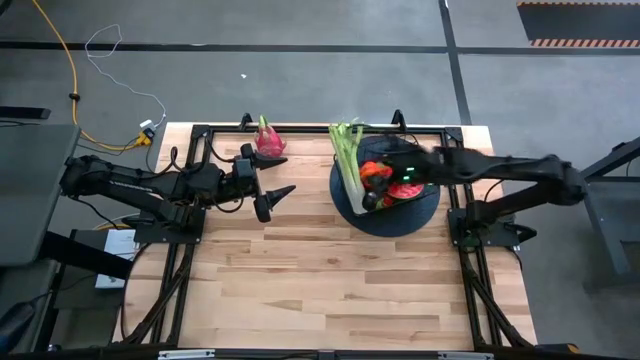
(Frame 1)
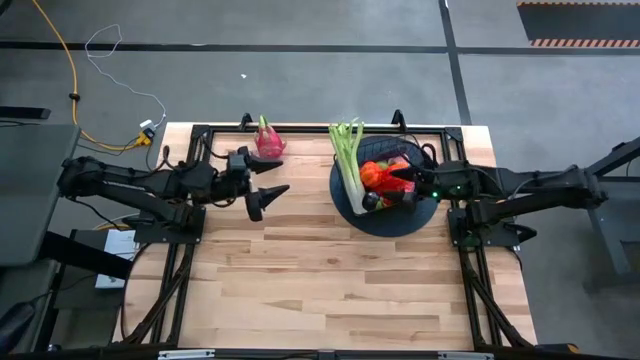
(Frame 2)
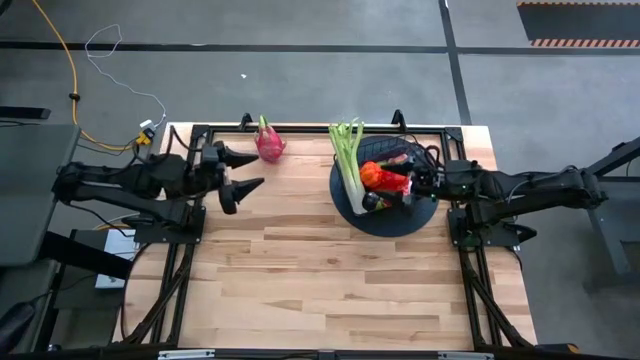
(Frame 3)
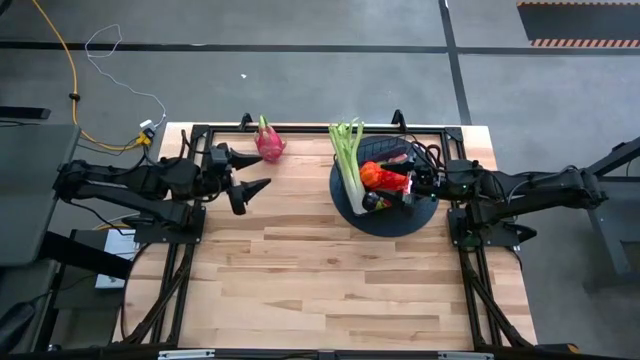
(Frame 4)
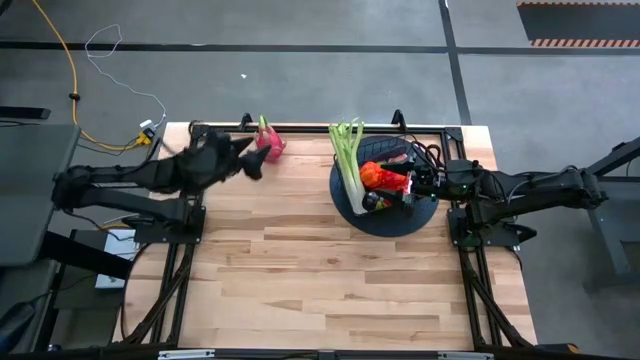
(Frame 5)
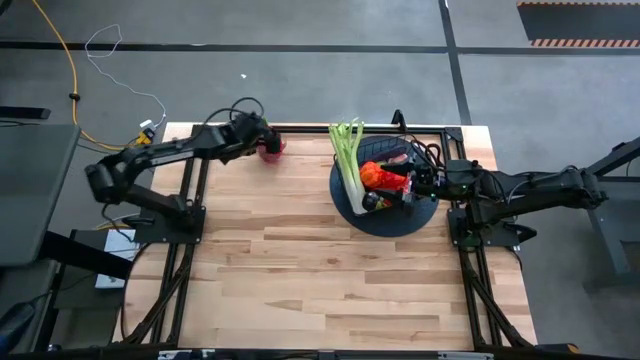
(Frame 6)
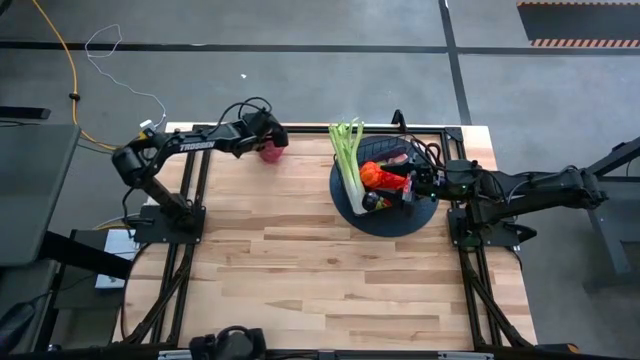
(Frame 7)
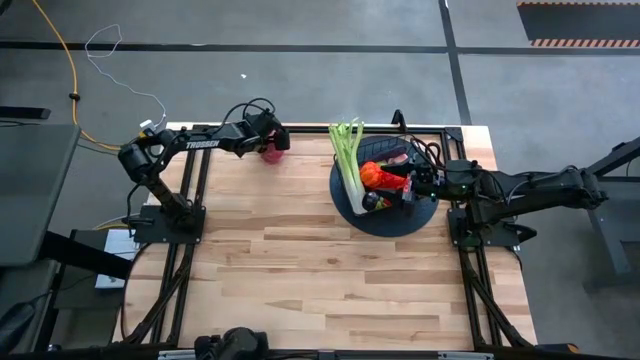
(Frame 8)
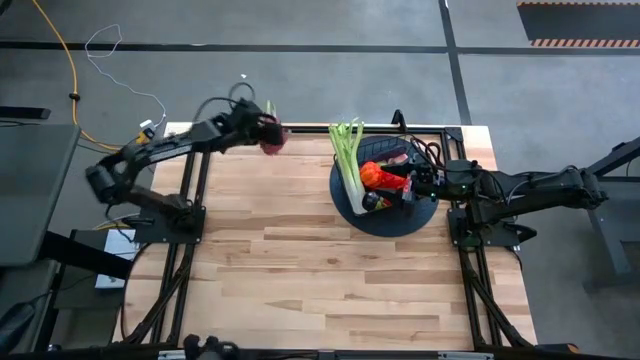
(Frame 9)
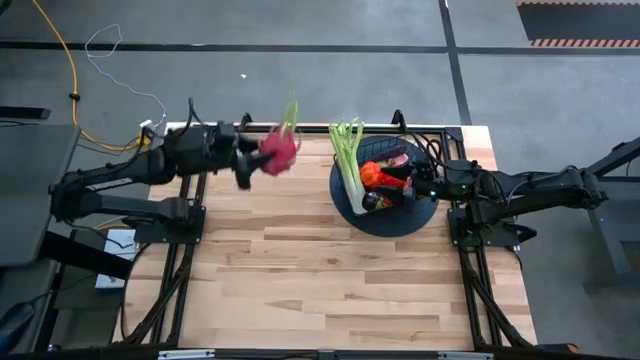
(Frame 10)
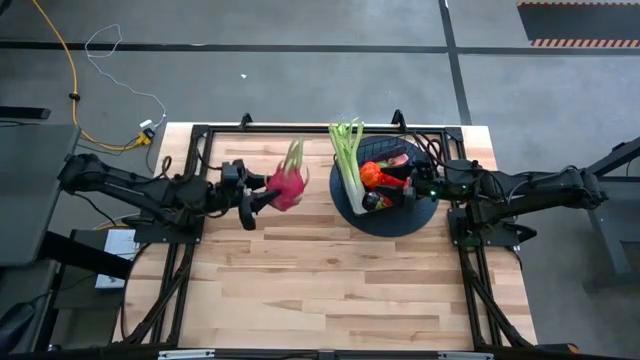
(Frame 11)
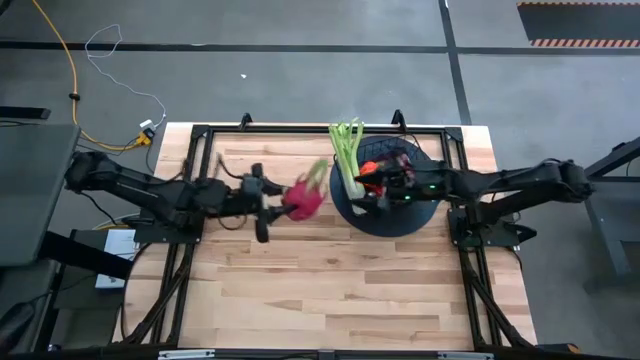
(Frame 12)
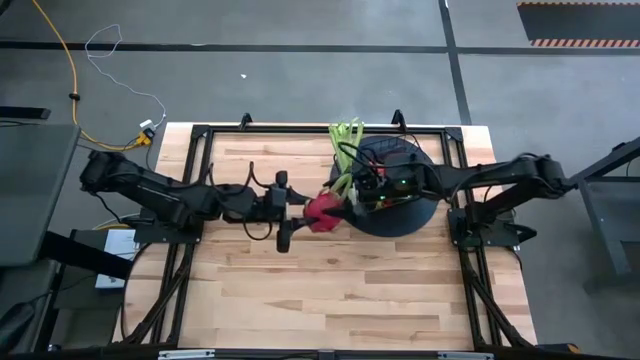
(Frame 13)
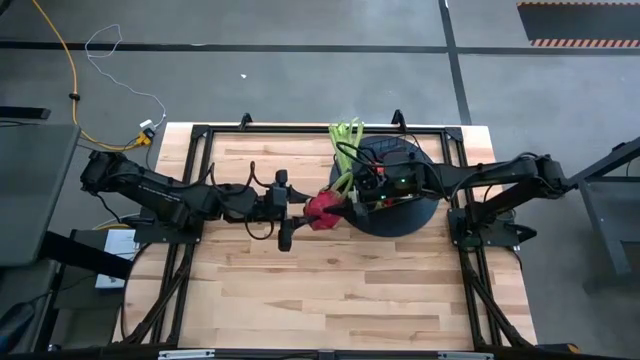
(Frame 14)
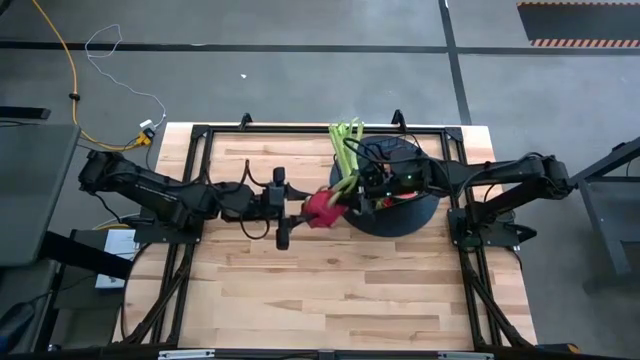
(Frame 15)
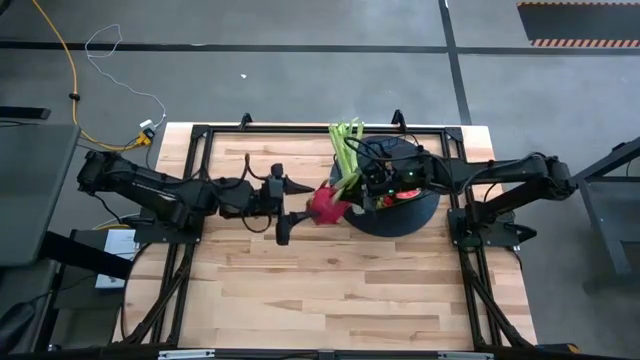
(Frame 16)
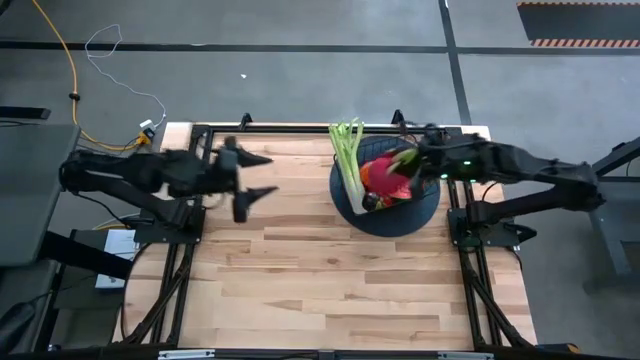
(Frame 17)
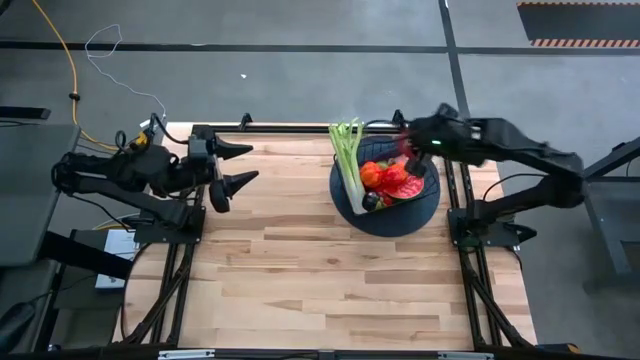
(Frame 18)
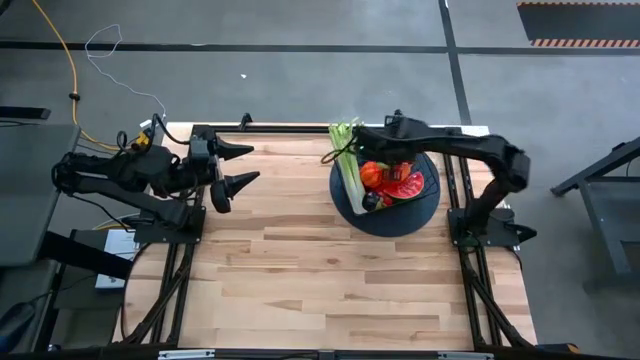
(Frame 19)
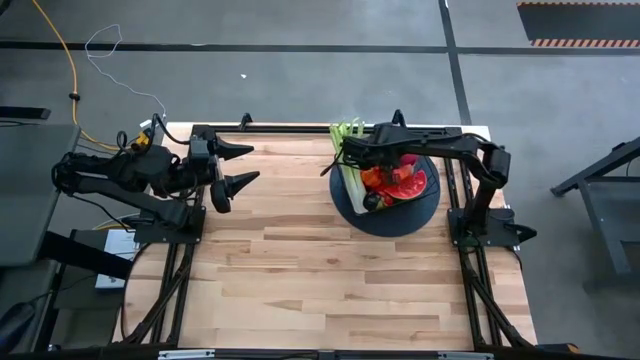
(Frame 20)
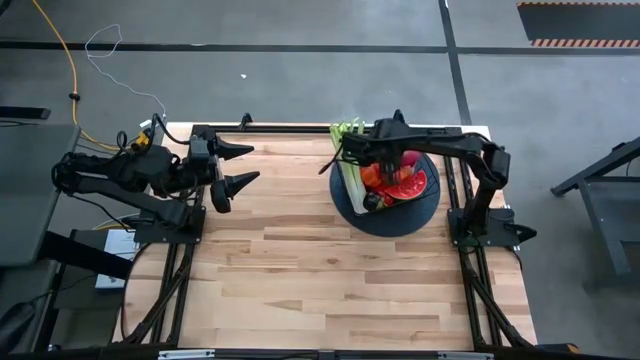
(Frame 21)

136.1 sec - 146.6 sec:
Task: Build produce basket
Put the dragon fruit into the wire basket

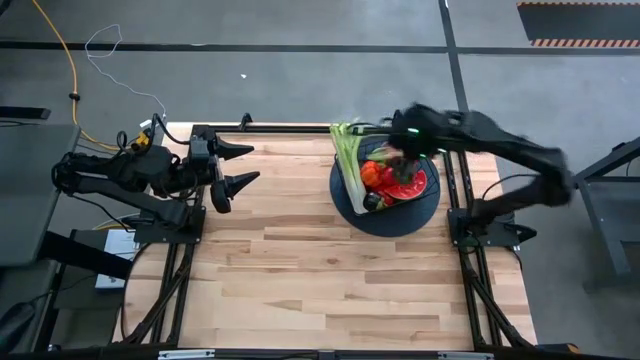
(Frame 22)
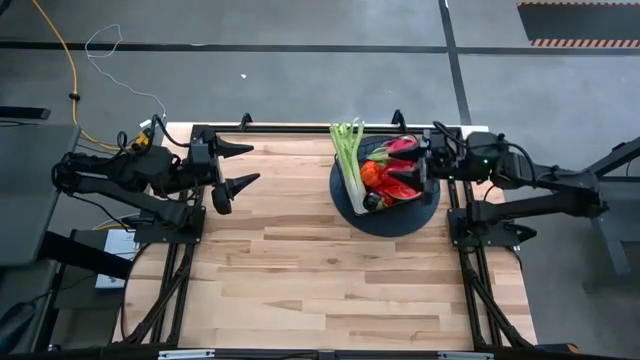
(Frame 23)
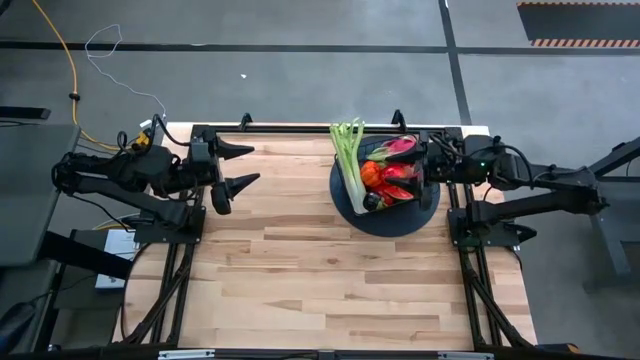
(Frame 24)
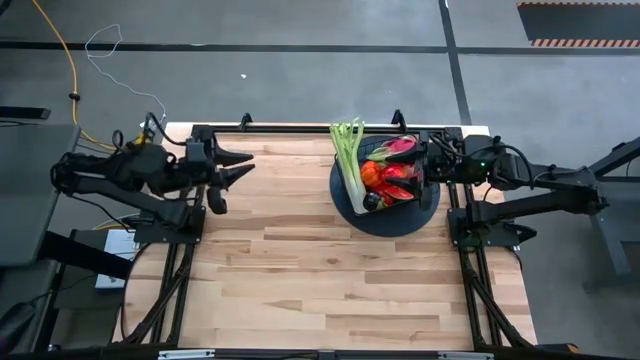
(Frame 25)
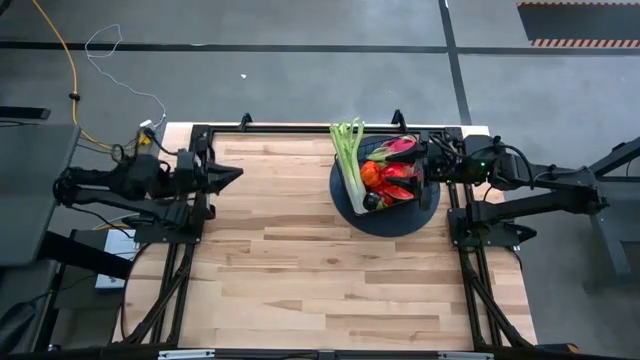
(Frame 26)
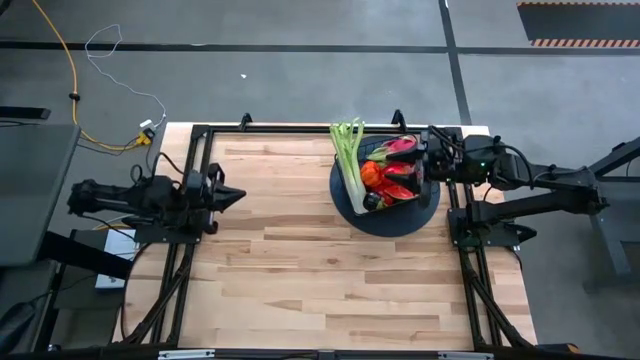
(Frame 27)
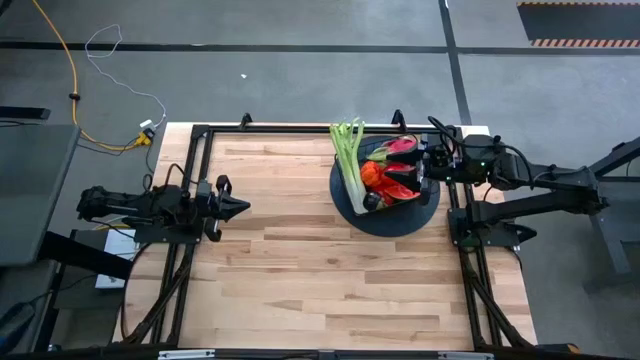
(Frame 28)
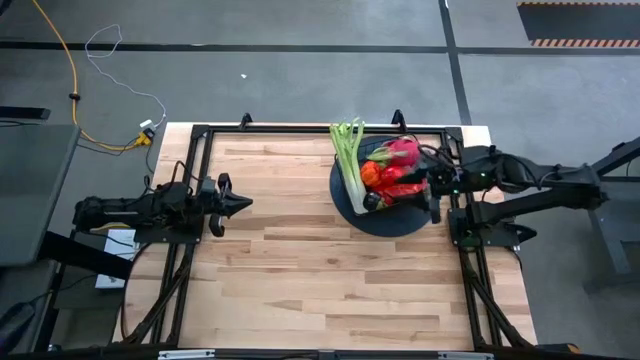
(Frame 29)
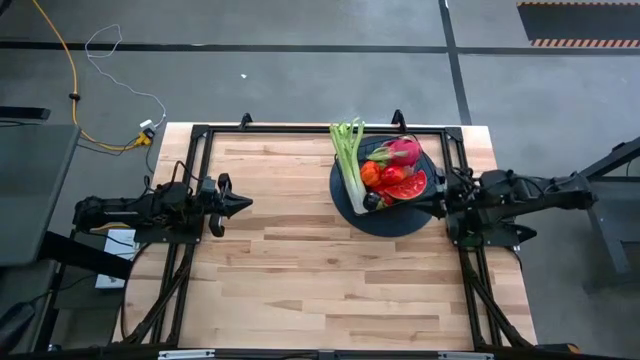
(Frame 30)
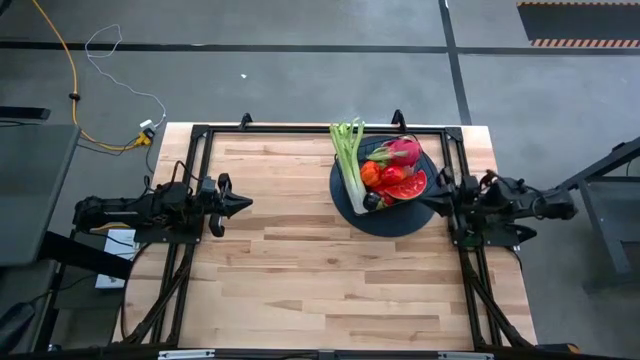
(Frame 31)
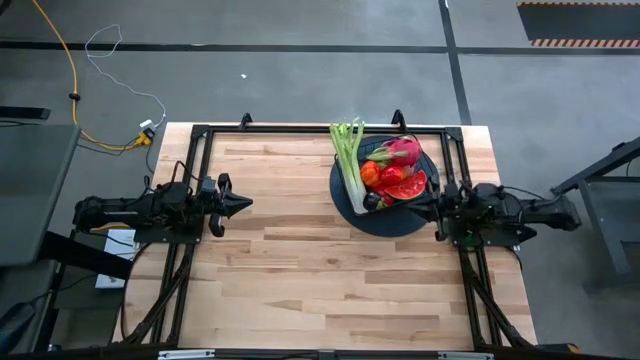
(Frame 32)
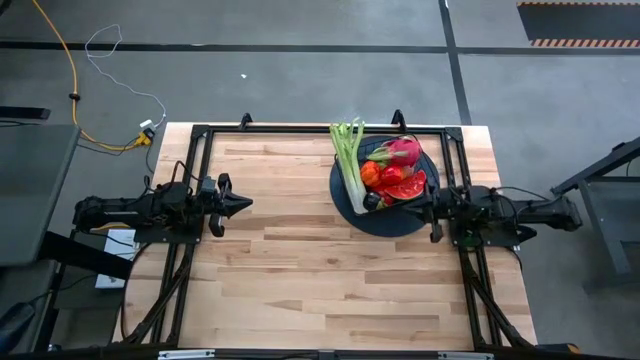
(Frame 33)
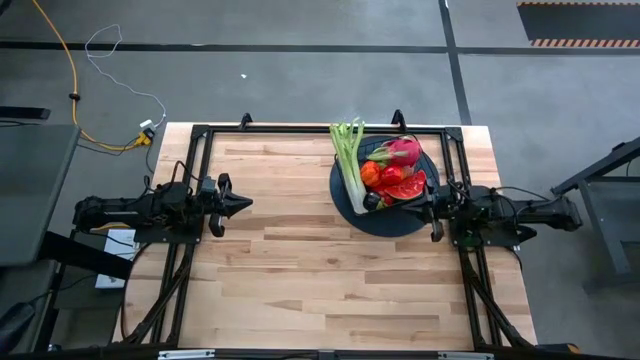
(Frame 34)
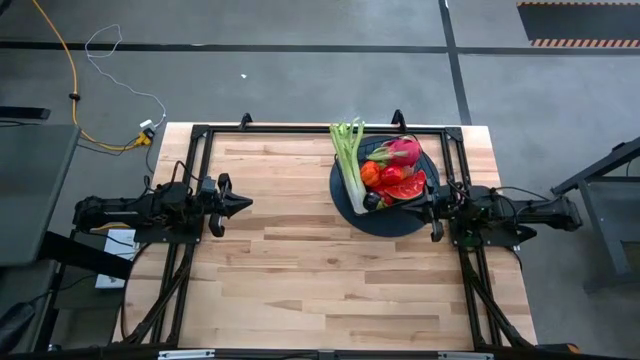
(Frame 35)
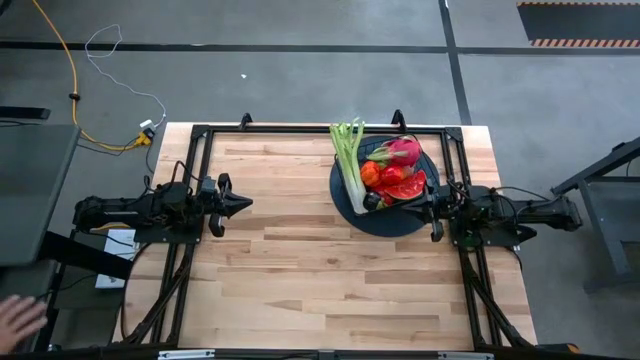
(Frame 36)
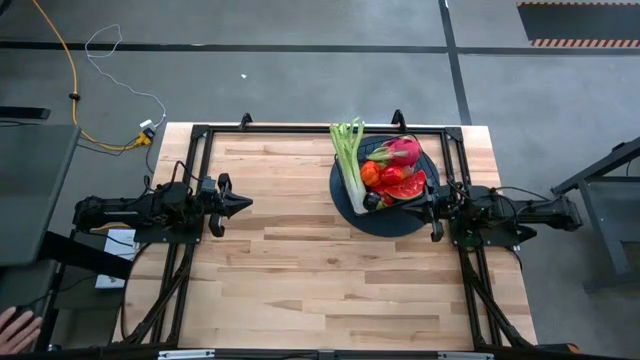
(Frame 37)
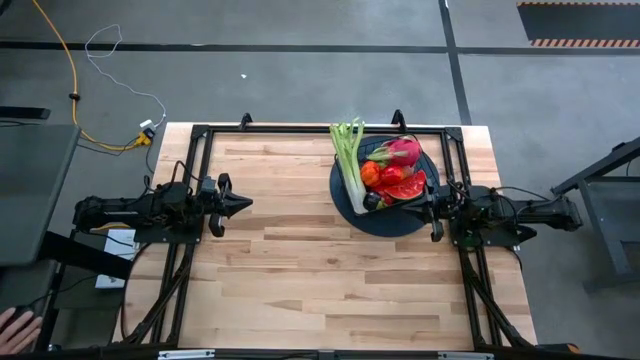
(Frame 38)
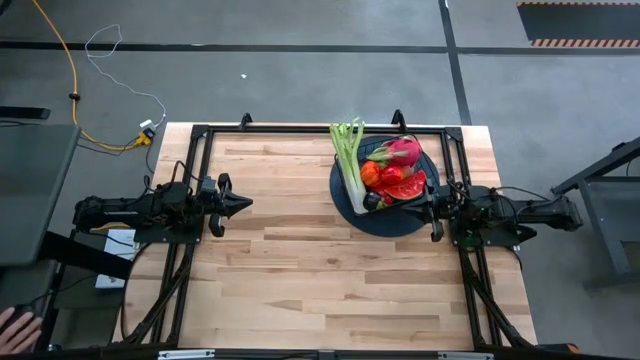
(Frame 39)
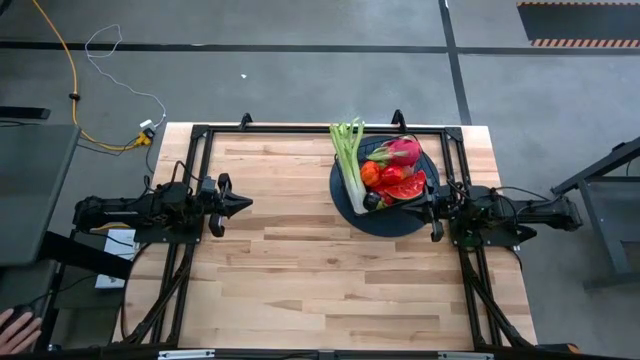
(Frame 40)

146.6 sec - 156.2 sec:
Return to Home Position

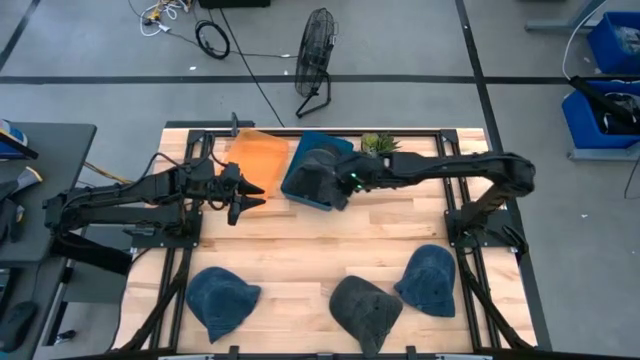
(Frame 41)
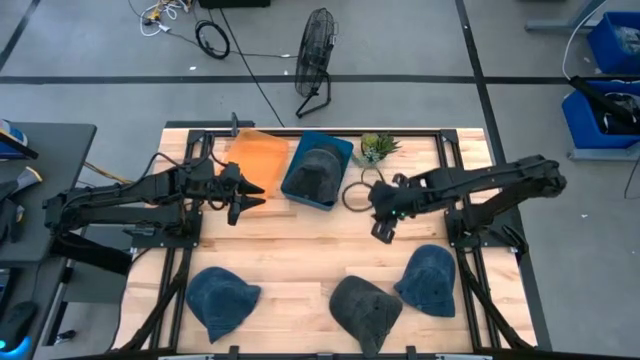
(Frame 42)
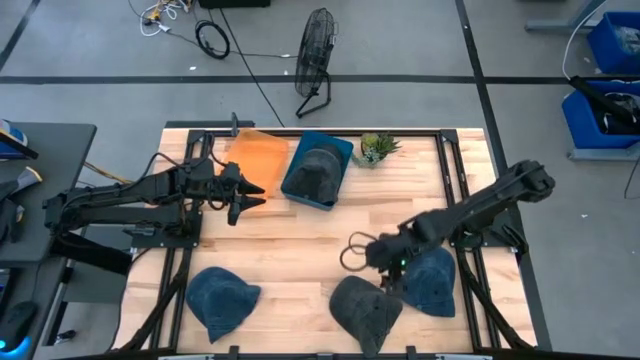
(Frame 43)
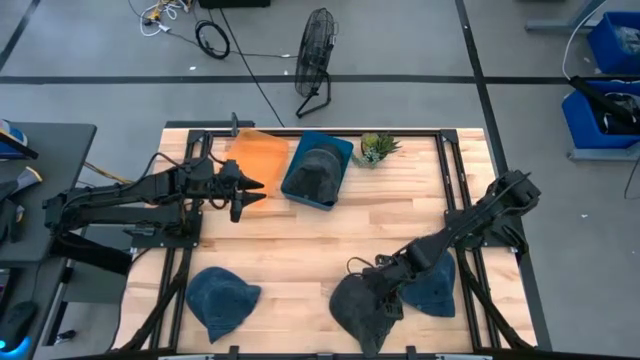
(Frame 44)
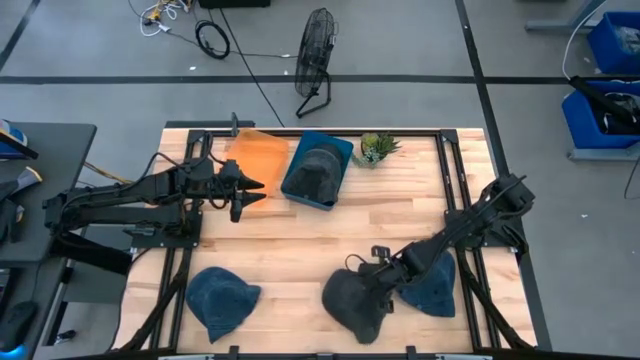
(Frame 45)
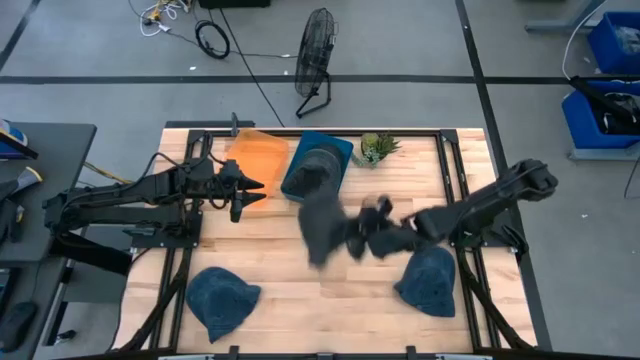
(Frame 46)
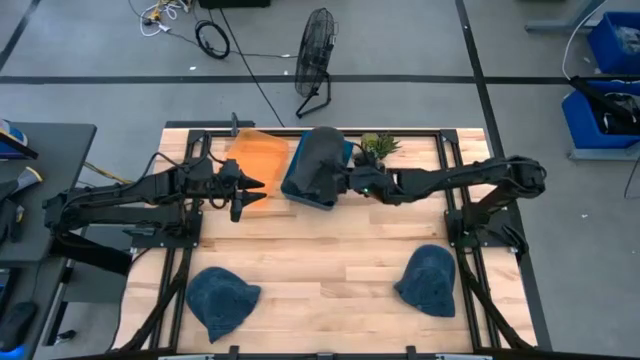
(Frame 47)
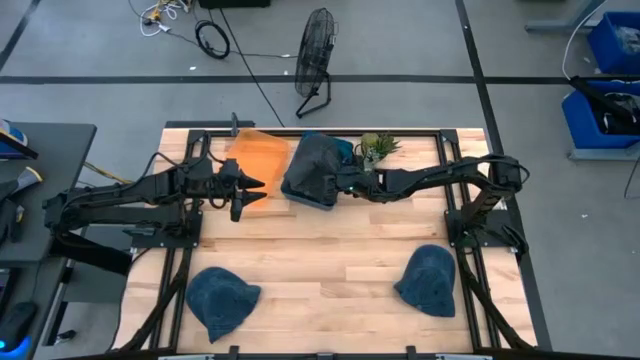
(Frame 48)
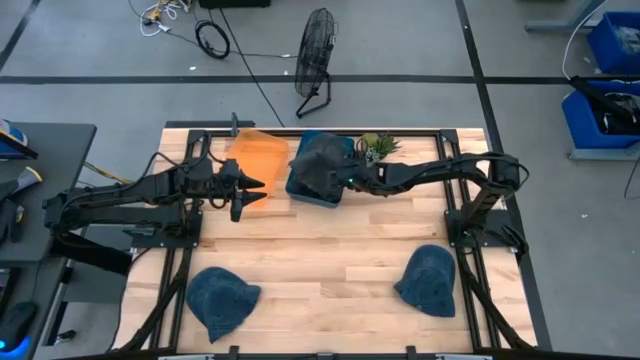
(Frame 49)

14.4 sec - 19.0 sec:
Task: Pick & Place hat
Put the black cap into the blue bin
